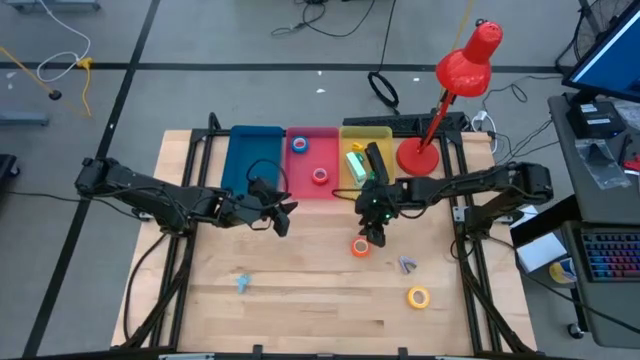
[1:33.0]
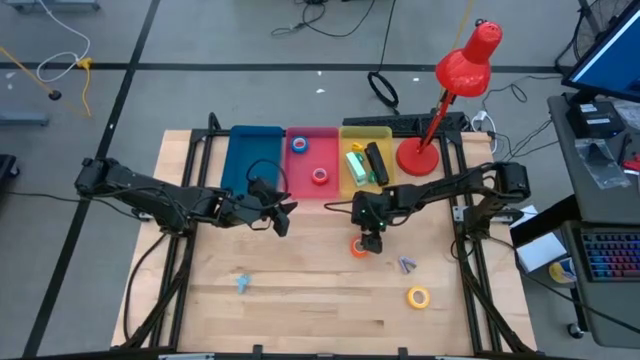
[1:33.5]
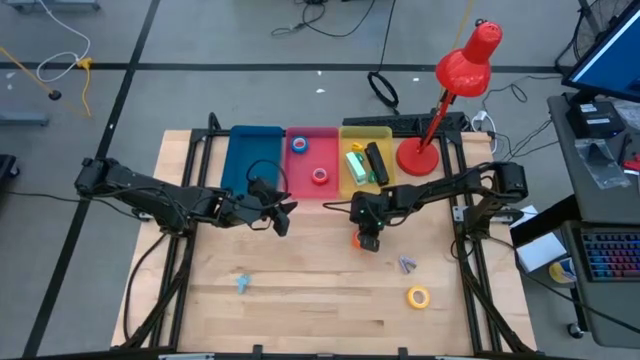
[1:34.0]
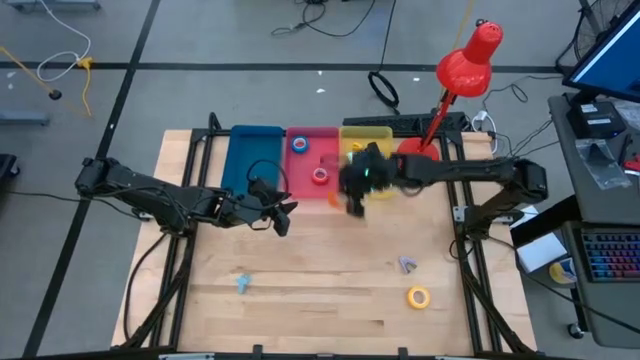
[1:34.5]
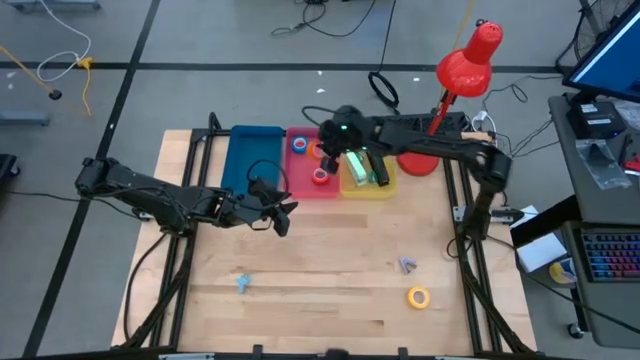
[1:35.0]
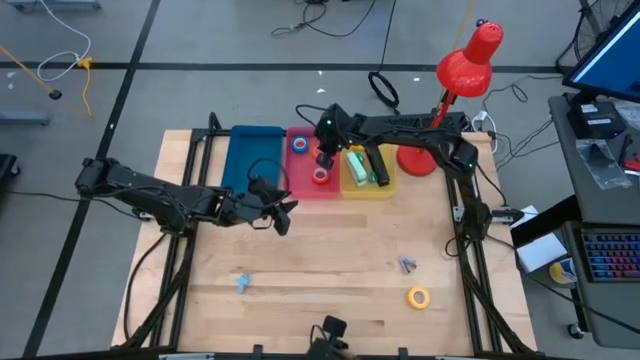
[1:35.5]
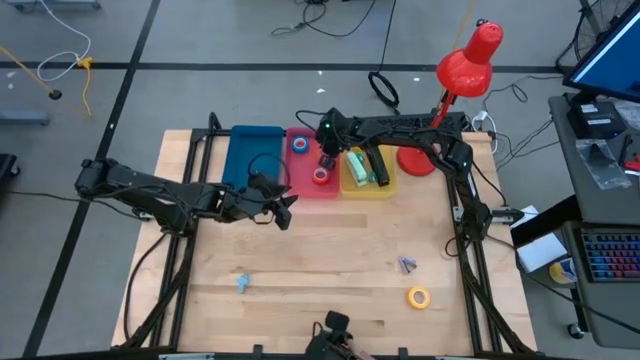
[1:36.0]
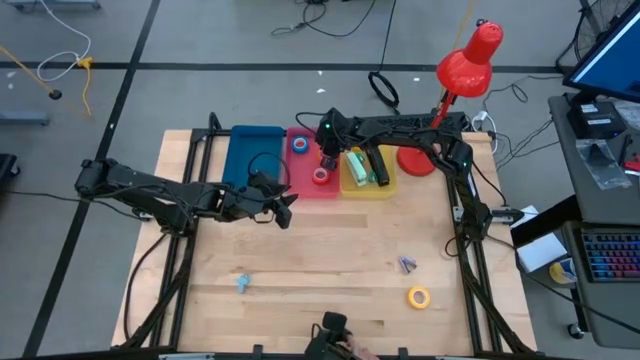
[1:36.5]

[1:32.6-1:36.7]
Task: Pick and place Stapler, Stapler remover, tape
Put the orange tape into the pink bin

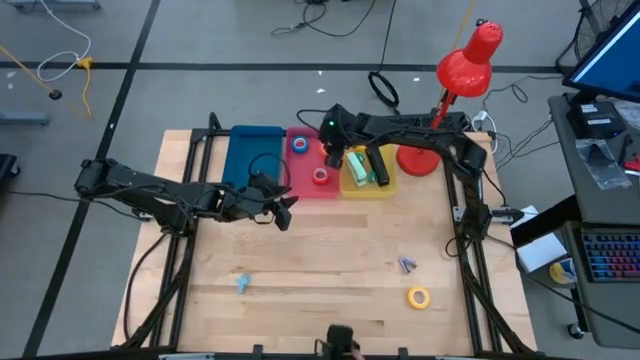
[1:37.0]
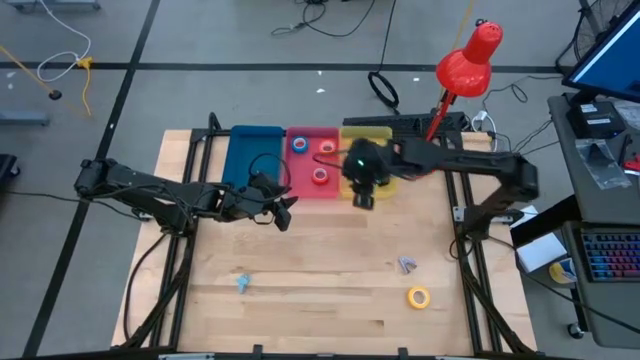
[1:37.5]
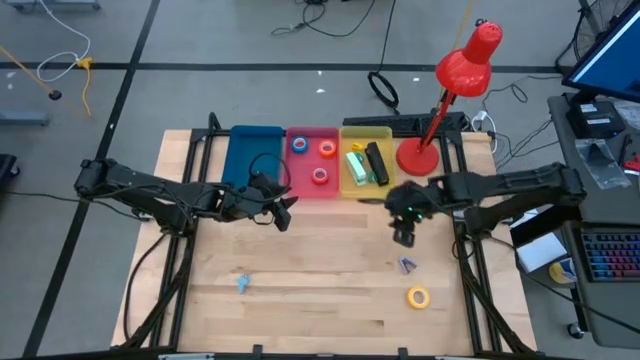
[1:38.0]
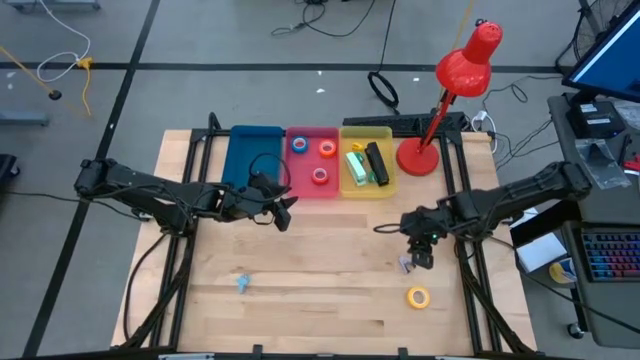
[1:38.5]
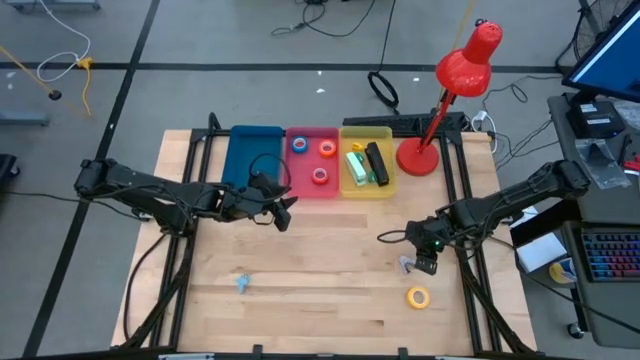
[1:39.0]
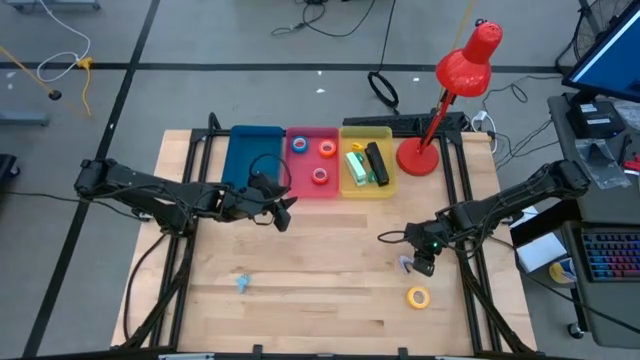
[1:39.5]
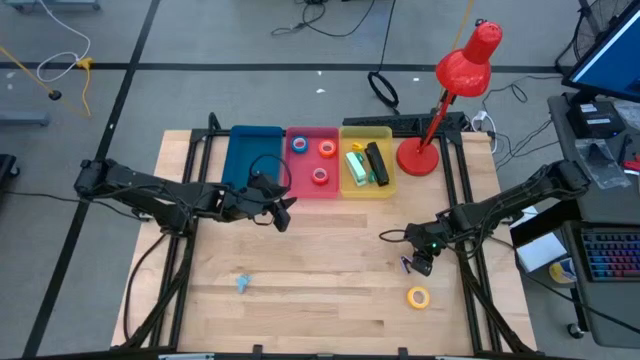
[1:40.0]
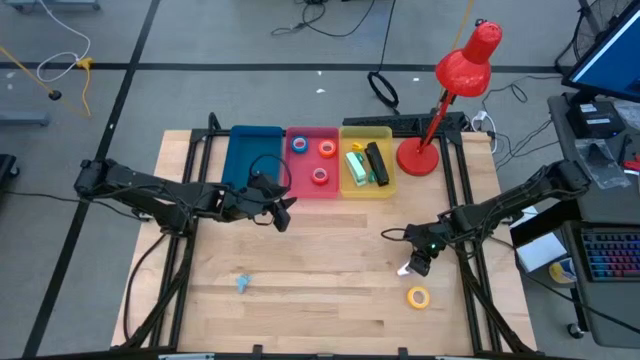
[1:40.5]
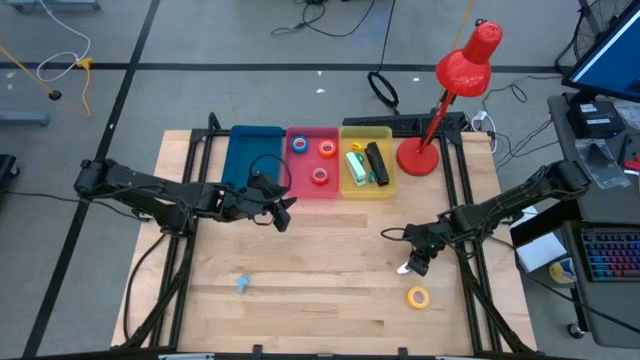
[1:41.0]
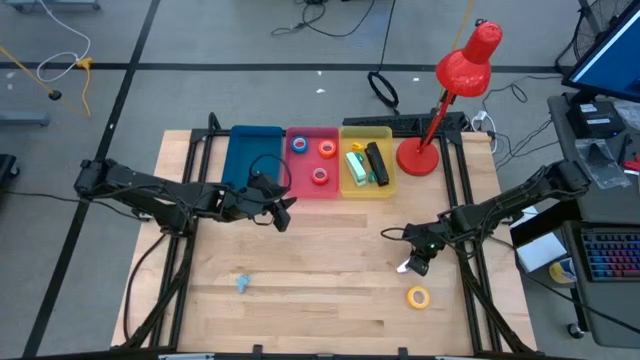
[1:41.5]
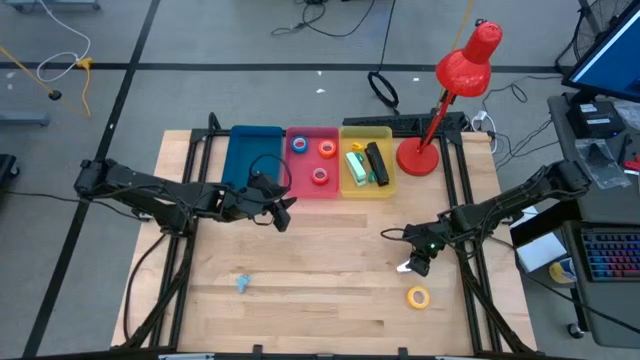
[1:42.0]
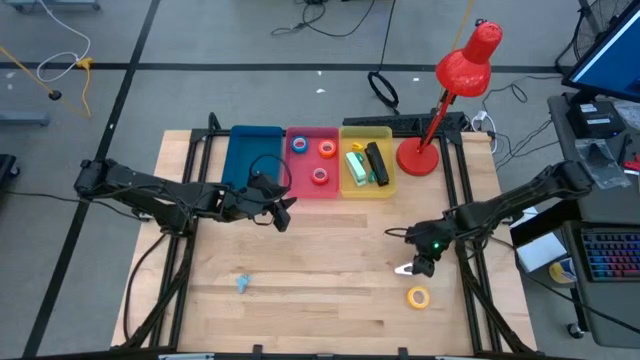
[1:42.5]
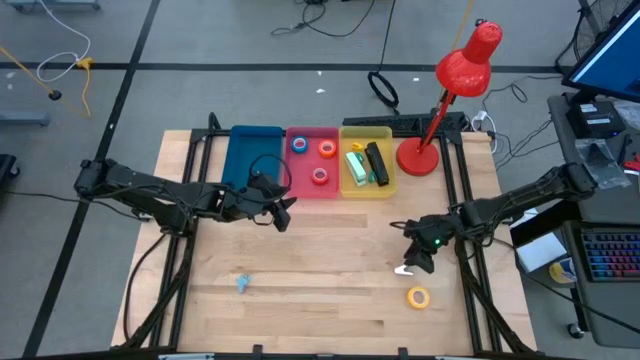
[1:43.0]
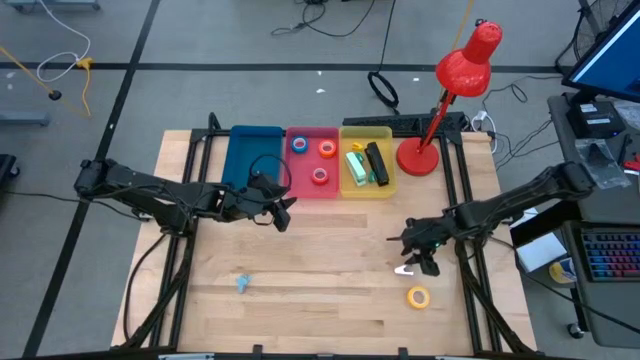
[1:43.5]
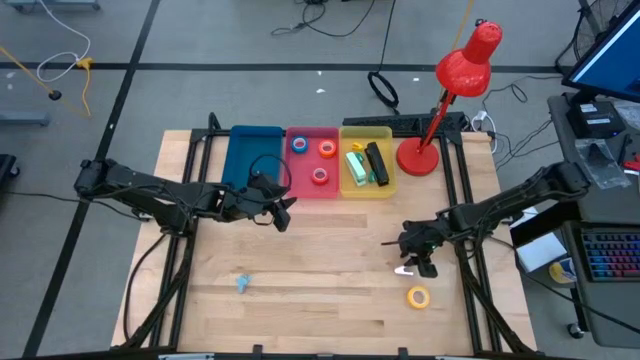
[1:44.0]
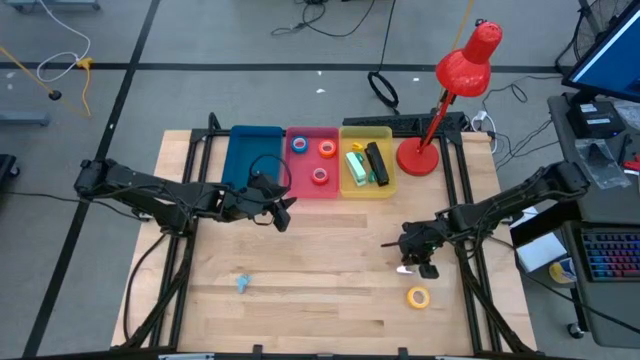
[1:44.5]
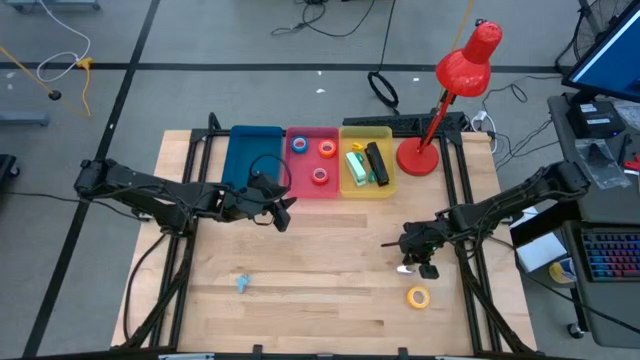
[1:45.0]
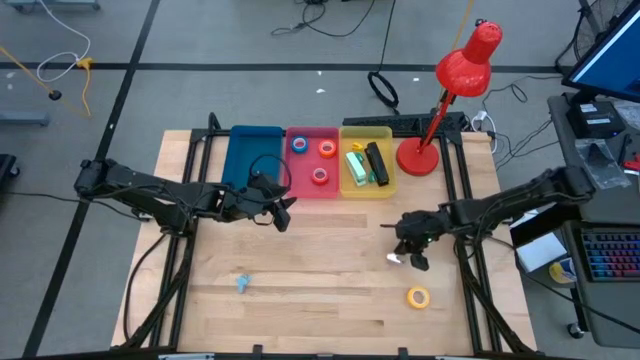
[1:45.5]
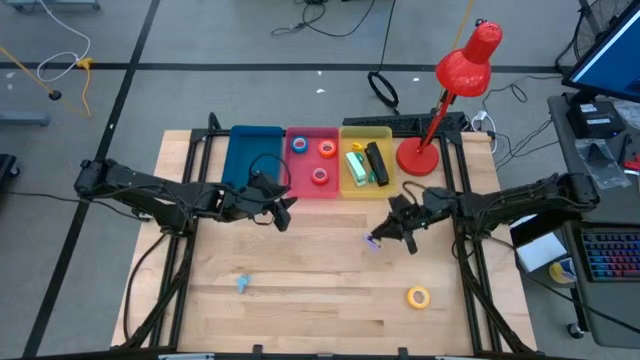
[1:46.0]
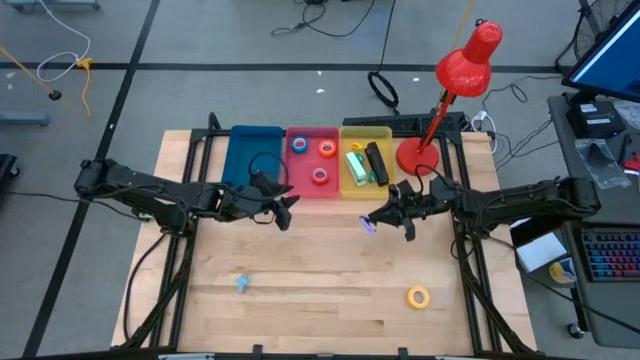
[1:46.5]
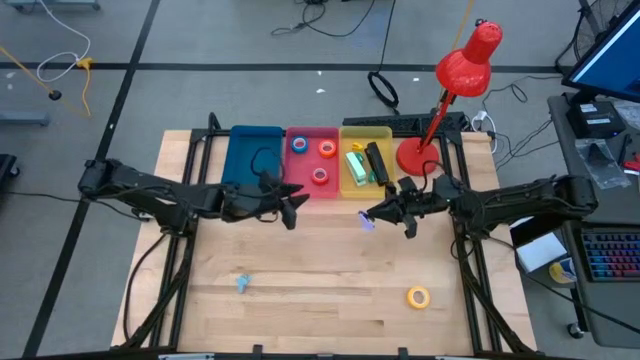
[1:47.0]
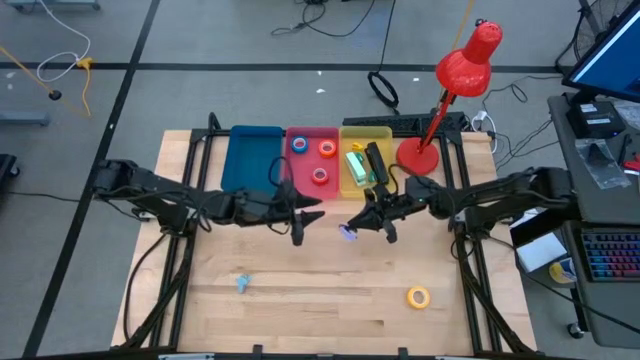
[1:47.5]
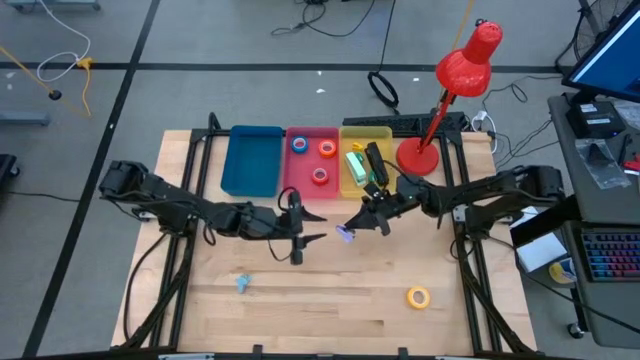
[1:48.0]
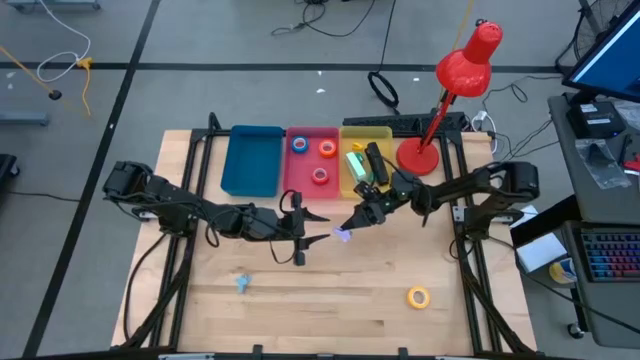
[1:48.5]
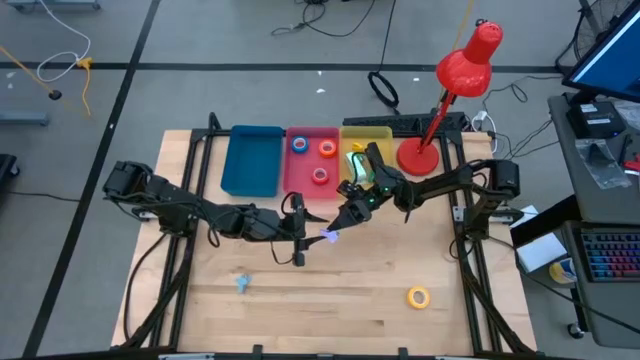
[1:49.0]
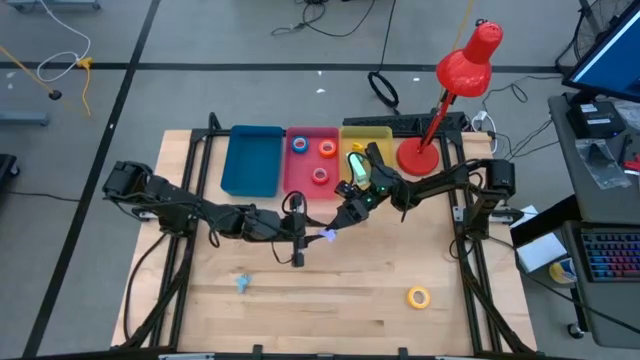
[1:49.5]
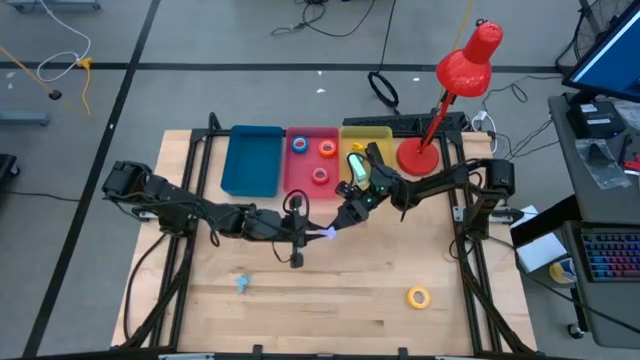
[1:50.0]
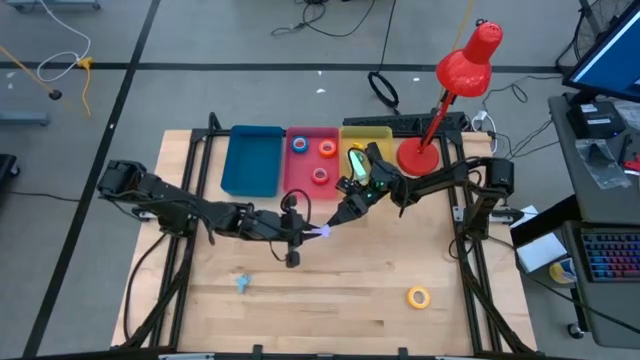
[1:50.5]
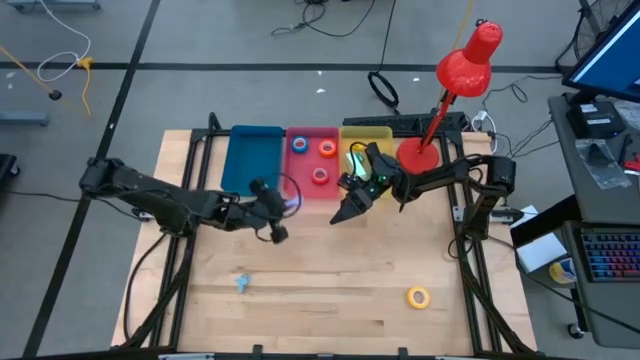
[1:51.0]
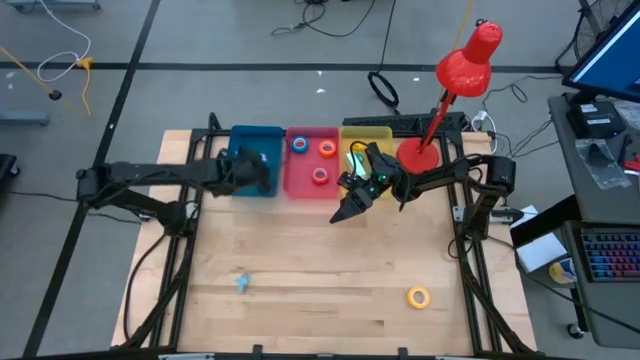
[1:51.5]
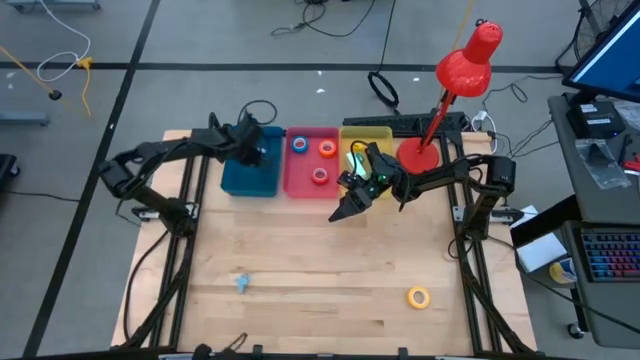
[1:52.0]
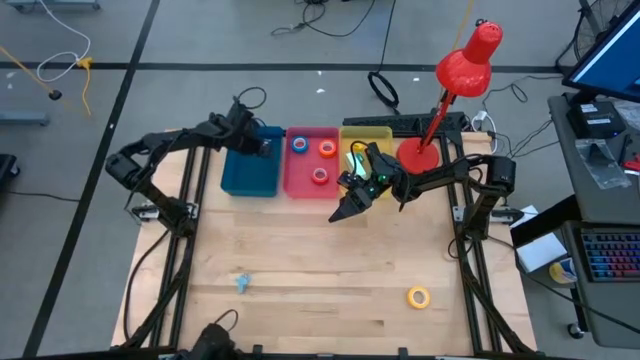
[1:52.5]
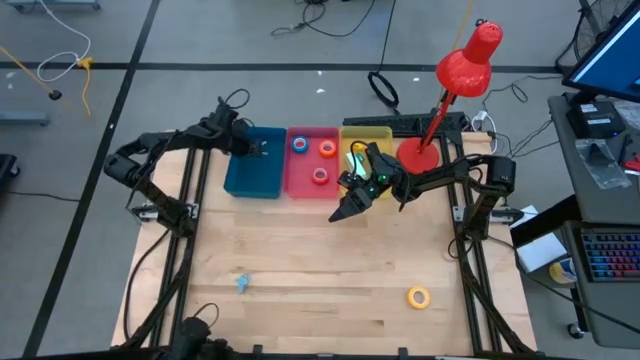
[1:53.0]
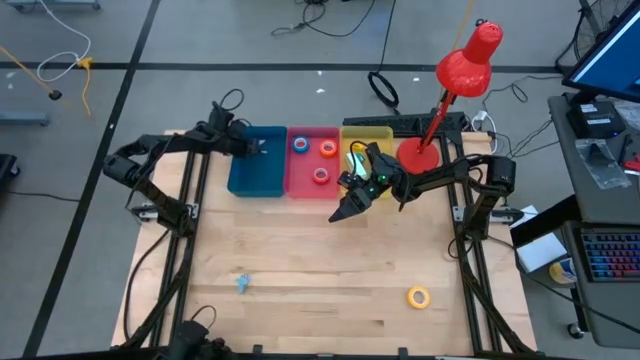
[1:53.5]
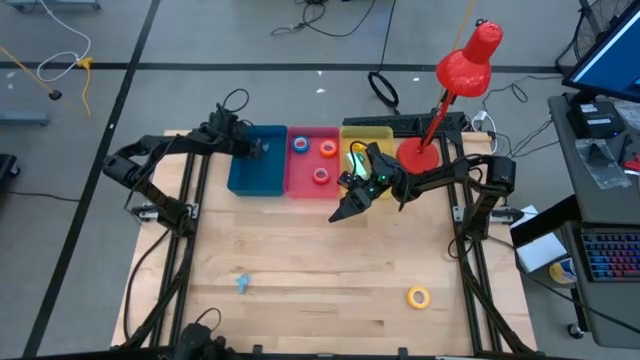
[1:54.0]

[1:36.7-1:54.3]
Put the purple staple remover into the blue bin
